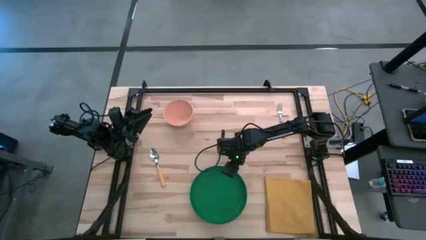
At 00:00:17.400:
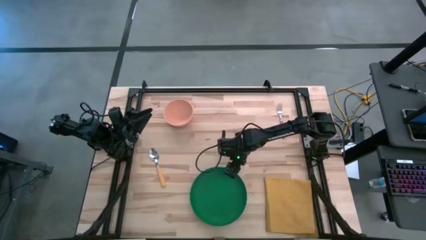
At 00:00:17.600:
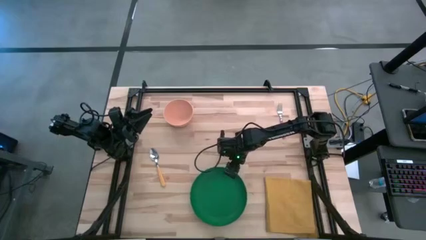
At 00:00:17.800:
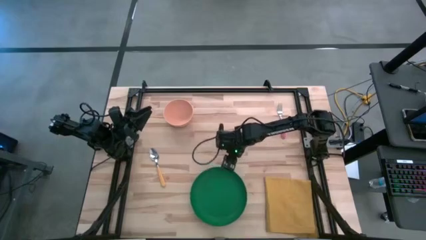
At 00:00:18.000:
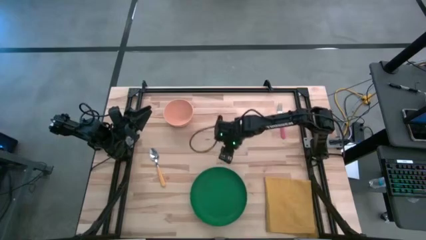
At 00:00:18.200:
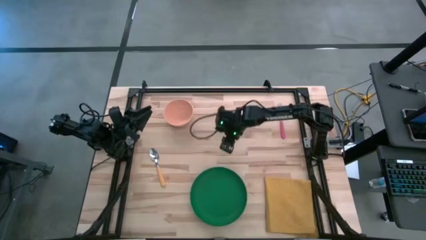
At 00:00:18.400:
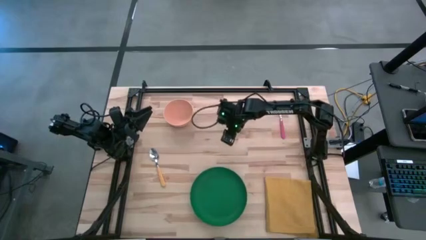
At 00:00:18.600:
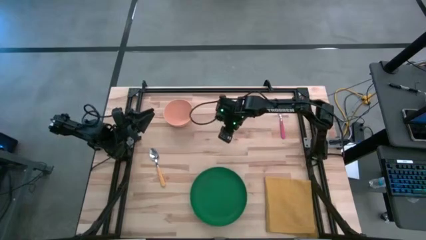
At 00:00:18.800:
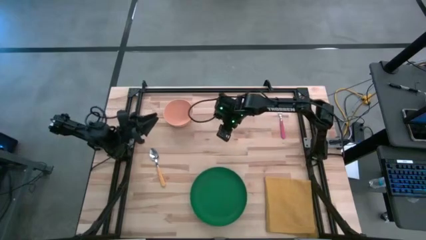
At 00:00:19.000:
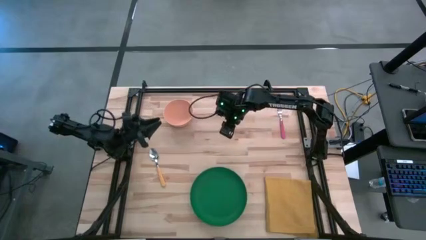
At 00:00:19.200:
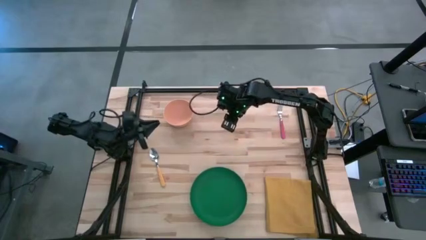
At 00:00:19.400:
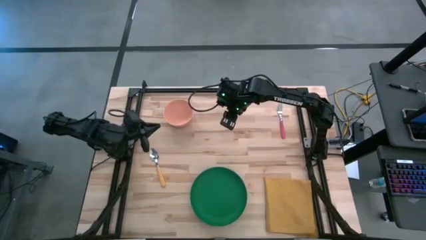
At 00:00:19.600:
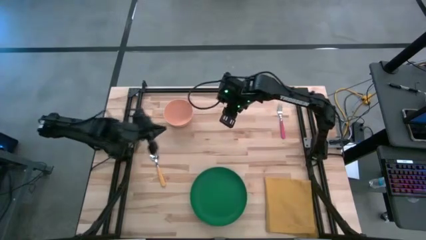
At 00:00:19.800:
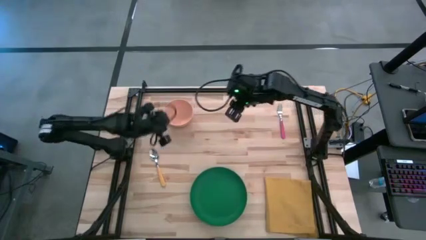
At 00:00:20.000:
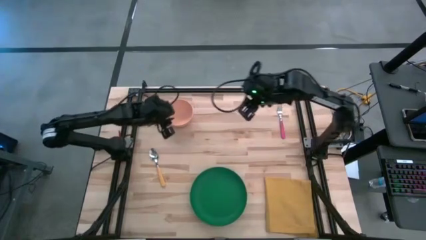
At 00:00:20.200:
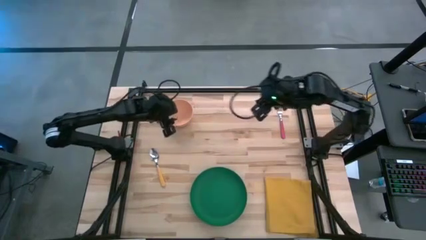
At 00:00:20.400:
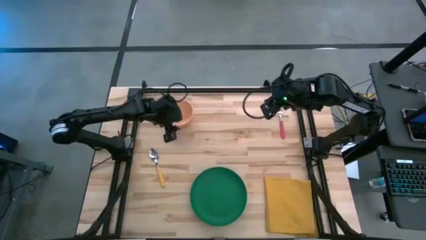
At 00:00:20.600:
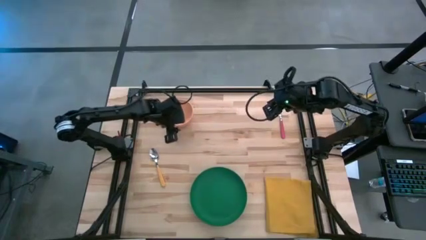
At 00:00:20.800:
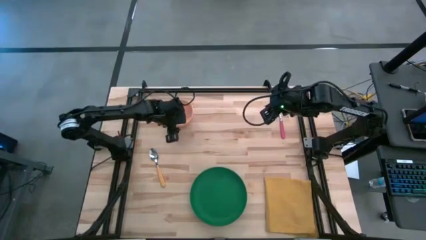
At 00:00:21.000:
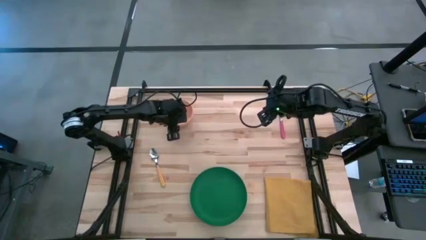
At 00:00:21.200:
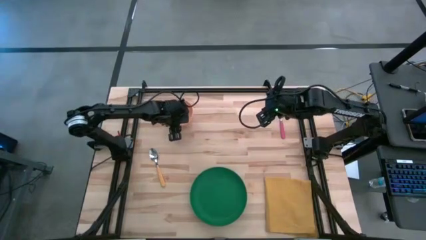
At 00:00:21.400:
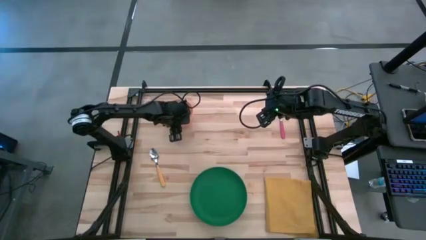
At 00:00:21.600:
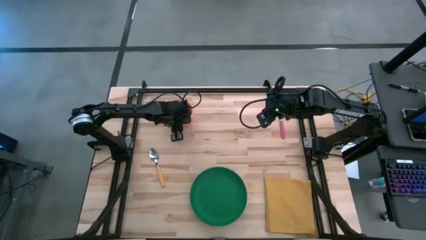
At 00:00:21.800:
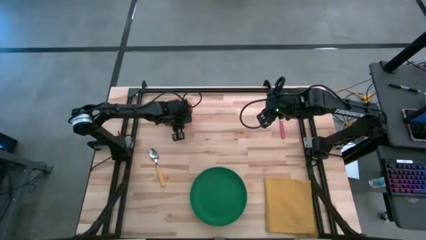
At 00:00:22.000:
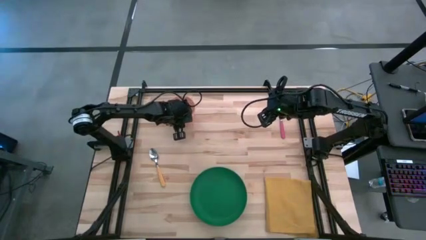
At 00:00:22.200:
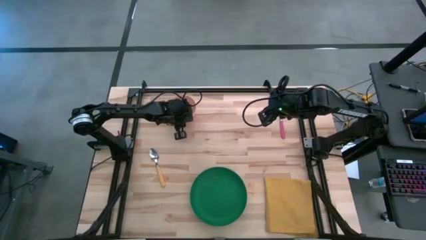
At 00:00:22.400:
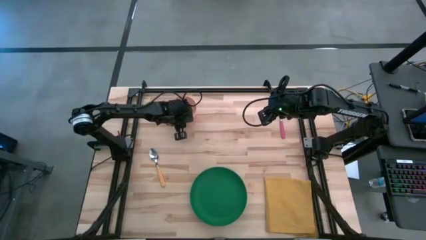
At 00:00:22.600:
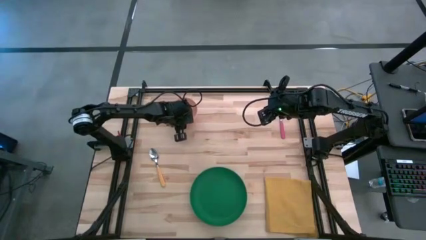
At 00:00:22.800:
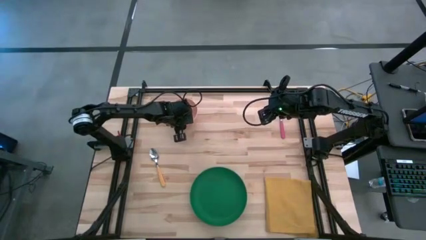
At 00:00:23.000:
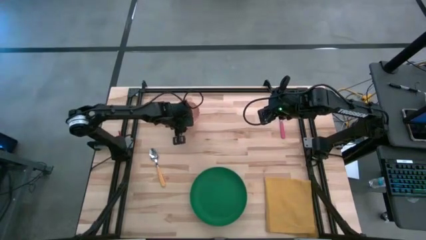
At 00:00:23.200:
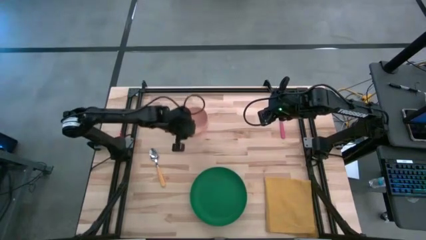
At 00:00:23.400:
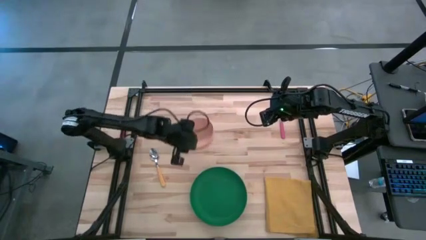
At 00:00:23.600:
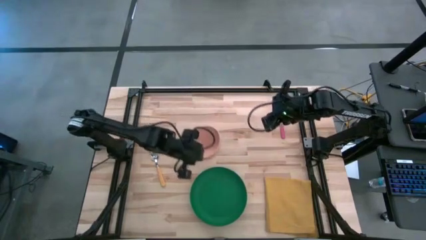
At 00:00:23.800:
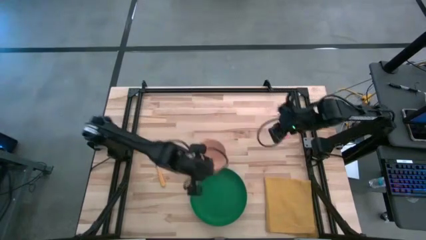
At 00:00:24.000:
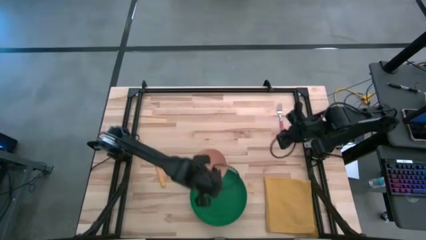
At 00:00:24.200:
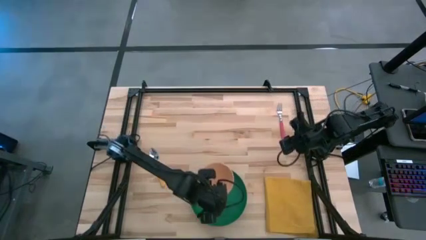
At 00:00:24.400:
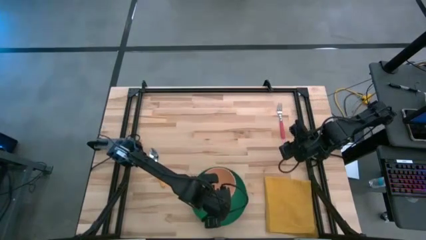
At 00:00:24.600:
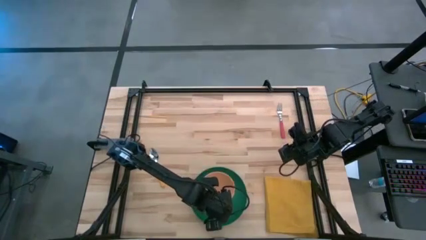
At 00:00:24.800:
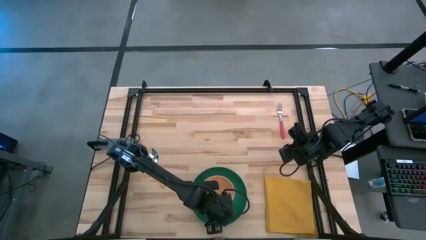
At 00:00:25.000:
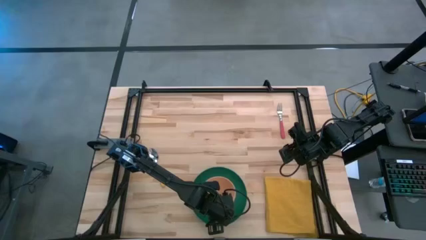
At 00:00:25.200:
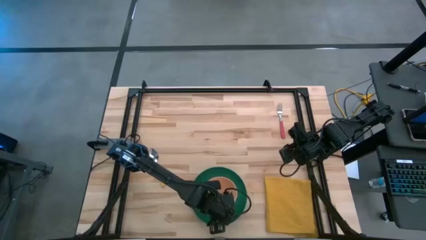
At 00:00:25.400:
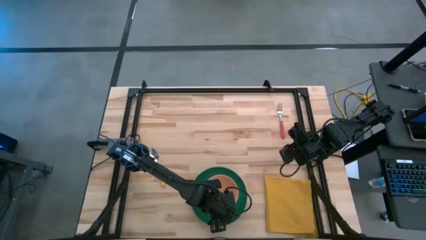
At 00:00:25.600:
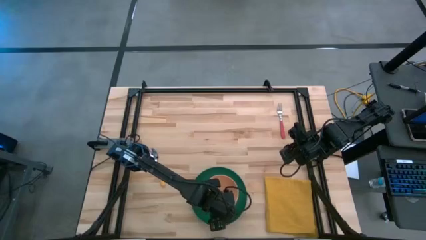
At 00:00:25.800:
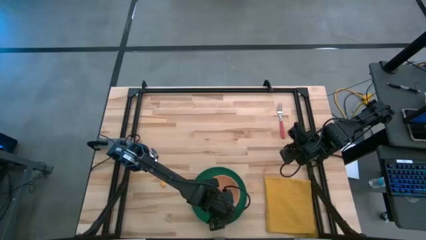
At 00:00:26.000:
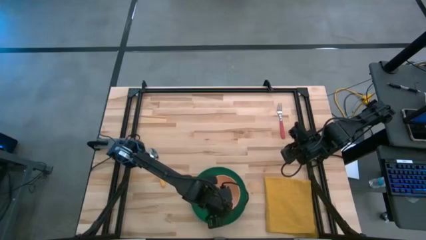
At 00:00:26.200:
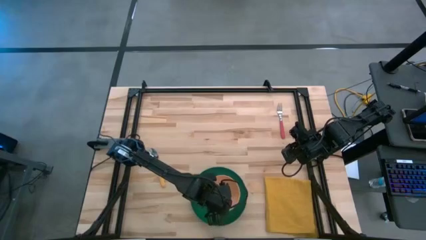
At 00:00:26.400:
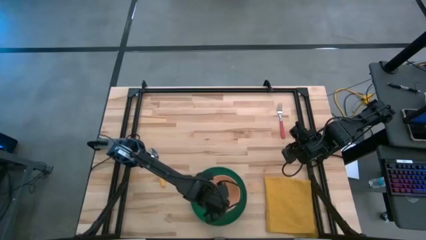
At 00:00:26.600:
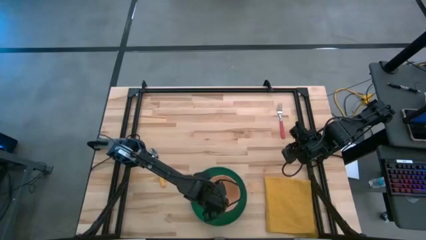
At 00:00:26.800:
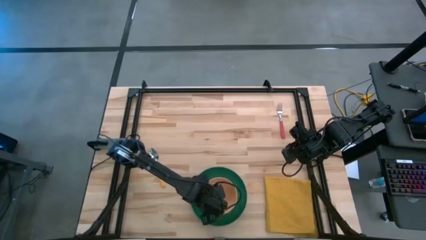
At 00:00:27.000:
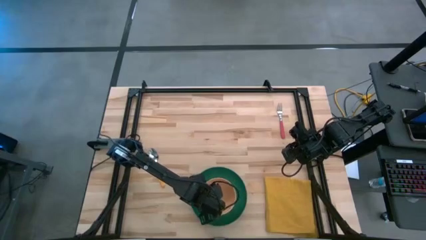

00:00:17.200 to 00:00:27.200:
Task: Set table place
Put the orange bowl into the green plate

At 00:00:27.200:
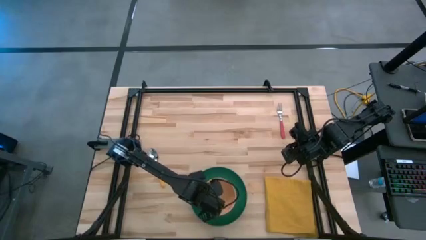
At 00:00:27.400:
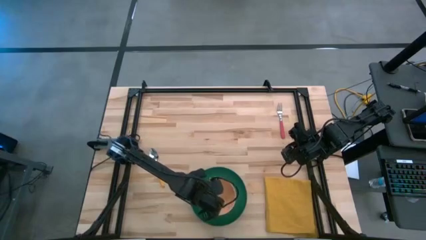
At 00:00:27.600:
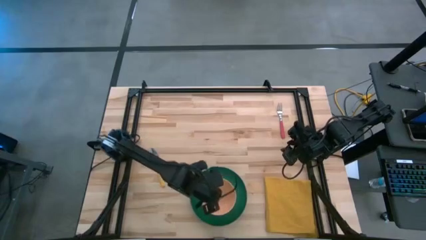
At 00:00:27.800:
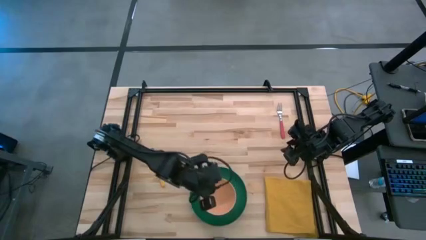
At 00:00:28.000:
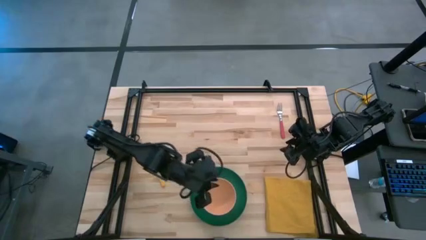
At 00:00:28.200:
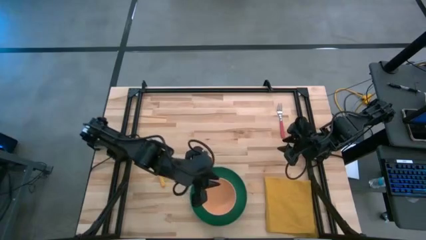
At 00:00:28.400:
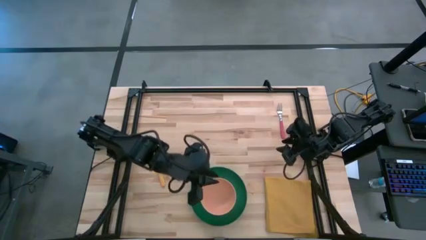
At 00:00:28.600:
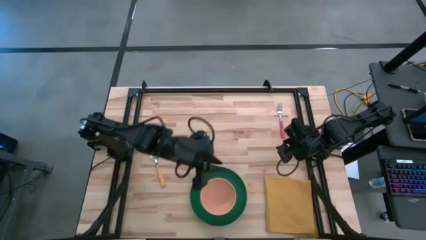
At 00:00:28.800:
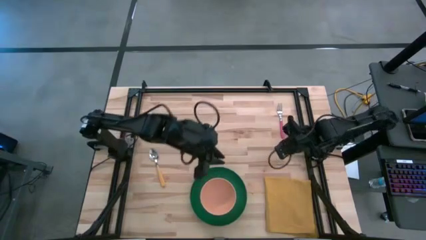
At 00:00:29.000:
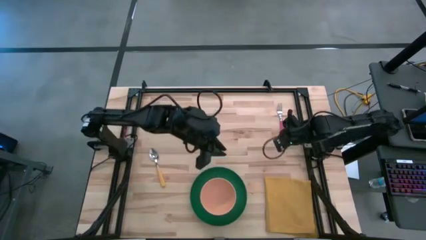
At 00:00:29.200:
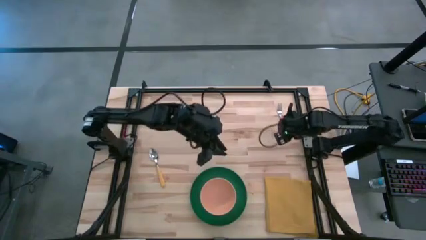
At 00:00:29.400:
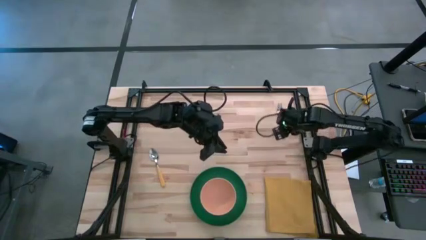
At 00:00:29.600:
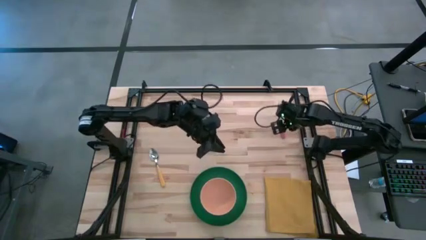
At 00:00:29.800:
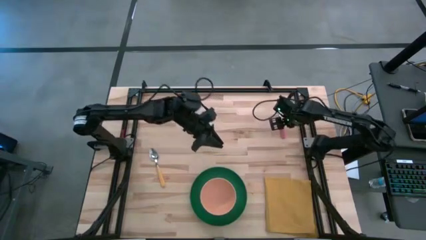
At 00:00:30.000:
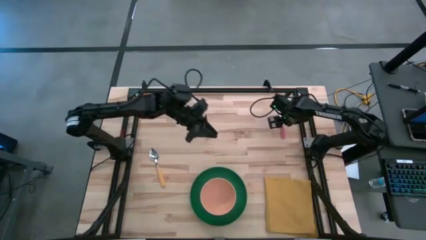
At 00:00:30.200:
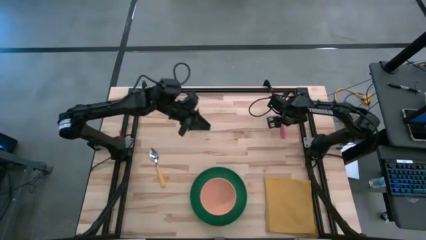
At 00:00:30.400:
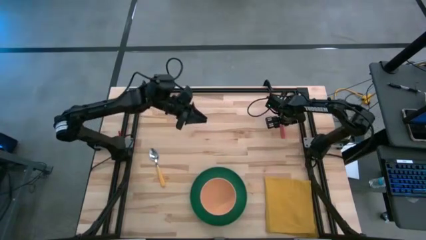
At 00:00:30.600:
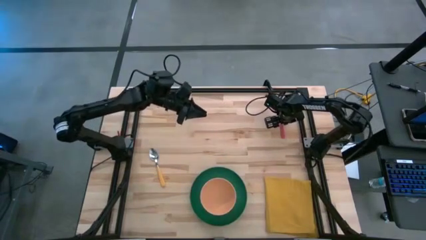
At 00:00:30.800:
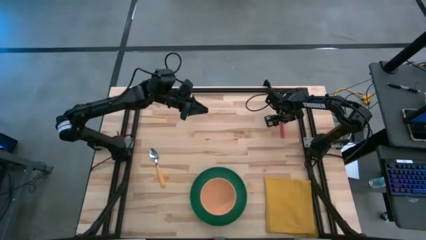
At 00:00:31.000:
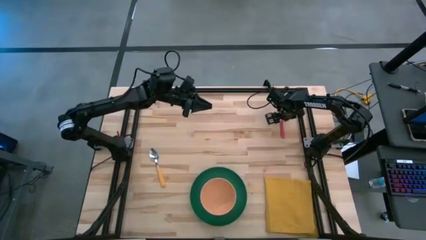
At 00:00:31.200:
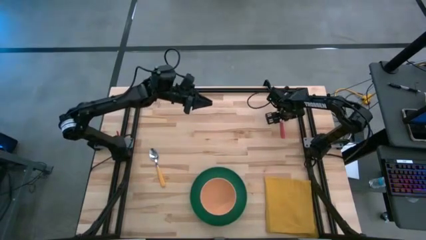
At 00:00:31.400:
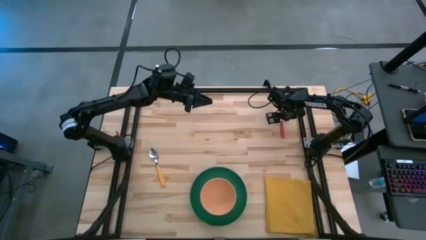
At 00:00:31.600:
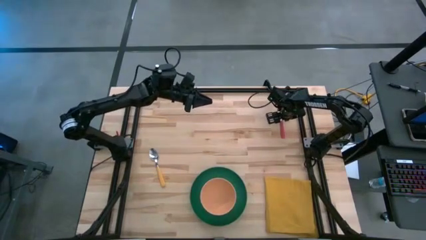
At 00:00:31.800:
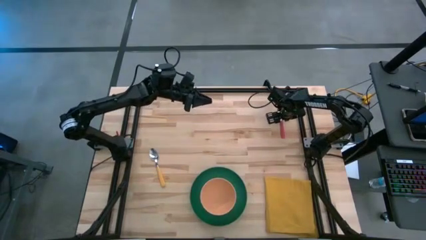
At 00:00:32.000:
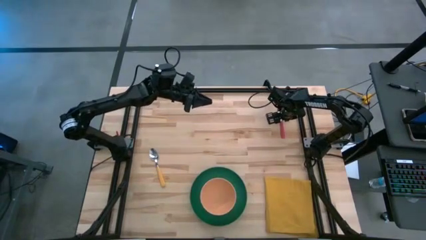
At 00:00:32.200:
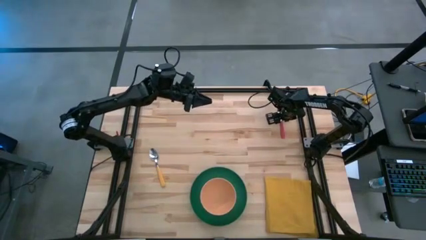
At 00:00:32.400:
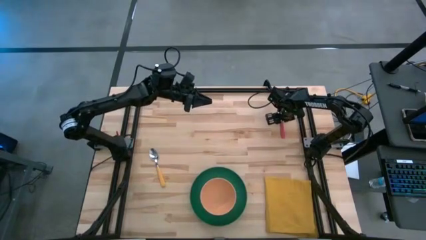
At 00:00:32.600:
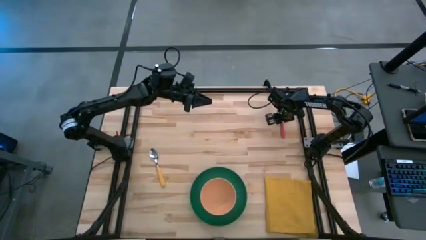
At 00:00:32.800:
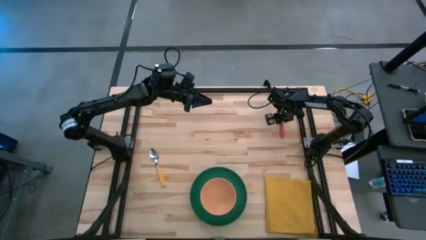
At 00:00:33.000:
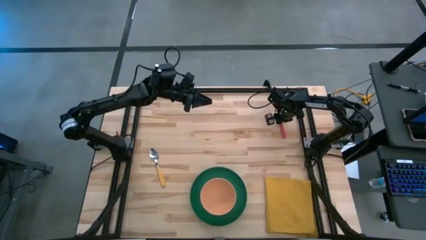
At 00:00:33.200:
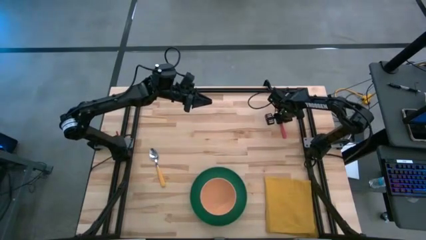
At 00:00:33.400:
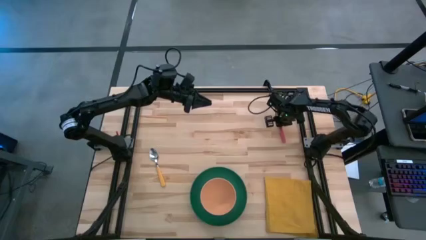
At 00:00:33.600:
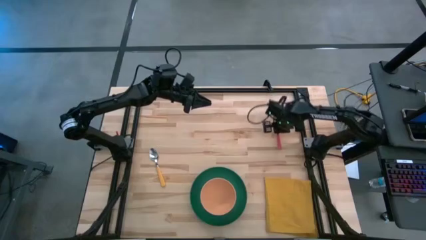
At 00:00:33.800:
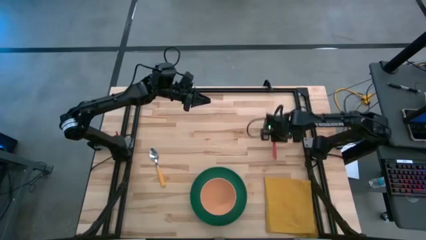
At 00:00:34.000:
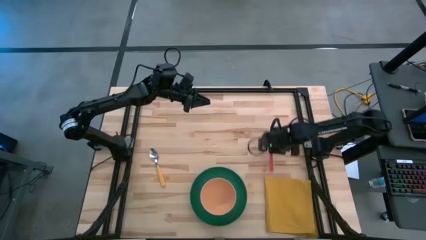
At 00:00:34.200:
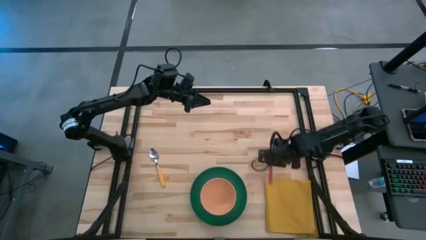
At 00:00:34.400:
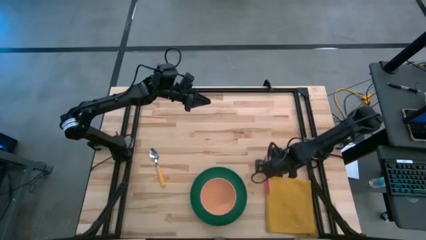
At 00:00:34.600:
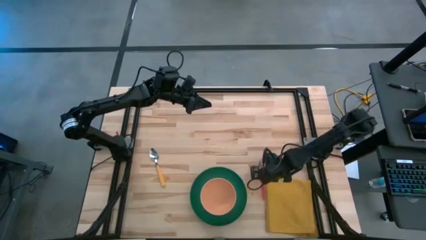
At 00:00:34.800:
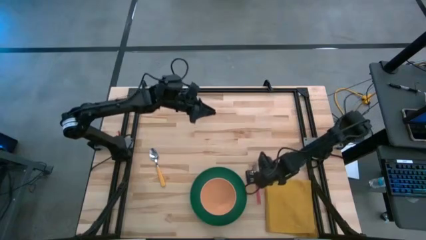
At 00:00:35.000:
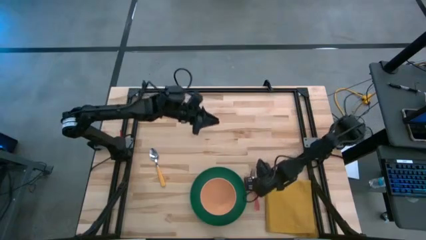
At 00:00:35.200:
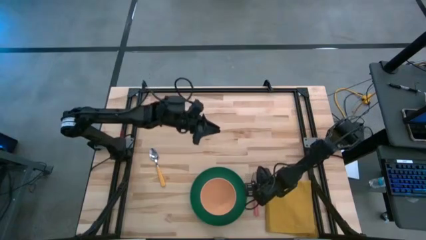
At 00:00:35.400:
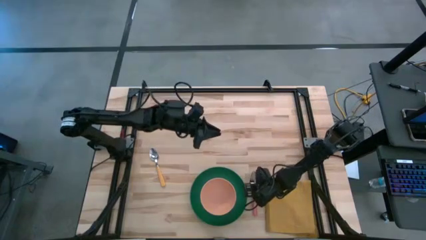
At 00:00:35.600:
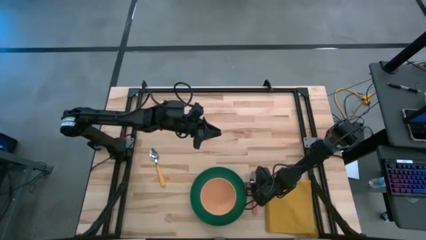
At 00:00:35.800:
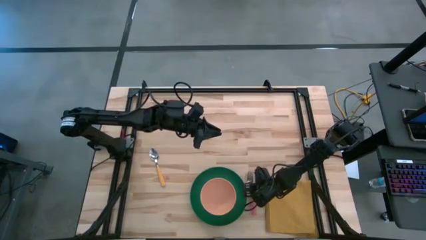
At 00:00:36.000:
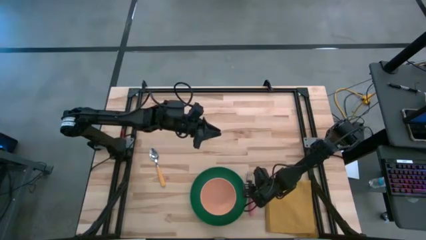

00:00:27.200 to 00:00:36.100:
Put the pink fork to the right of the green plate
